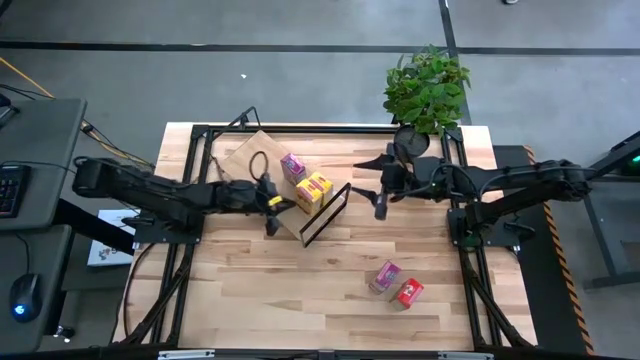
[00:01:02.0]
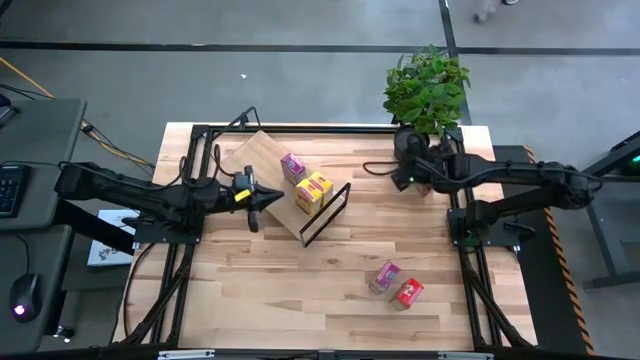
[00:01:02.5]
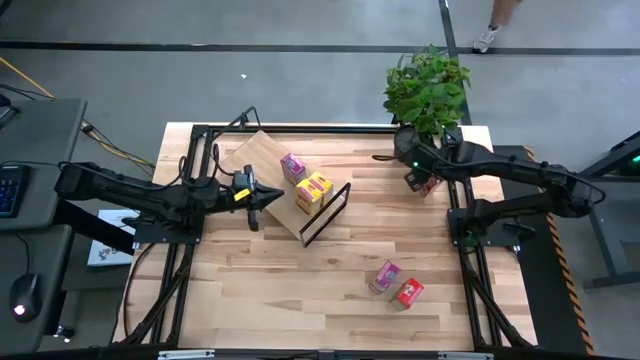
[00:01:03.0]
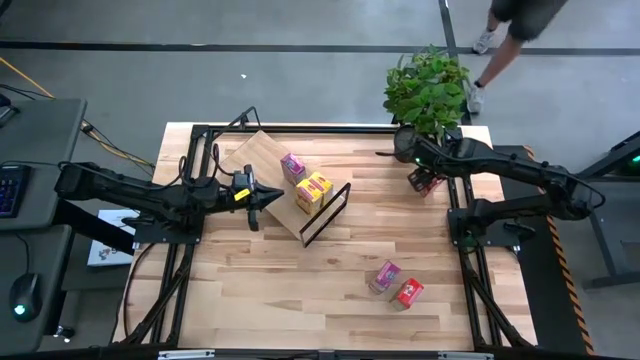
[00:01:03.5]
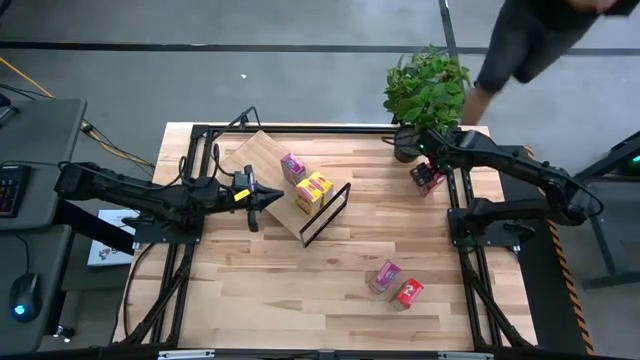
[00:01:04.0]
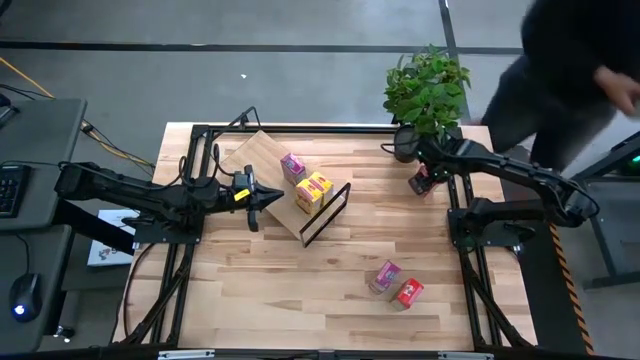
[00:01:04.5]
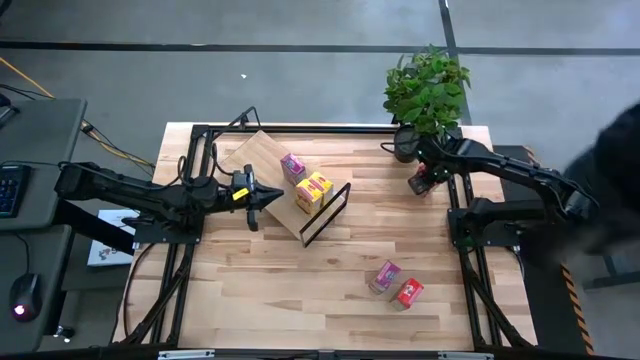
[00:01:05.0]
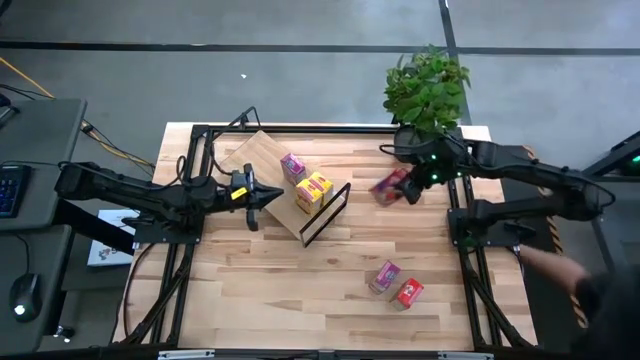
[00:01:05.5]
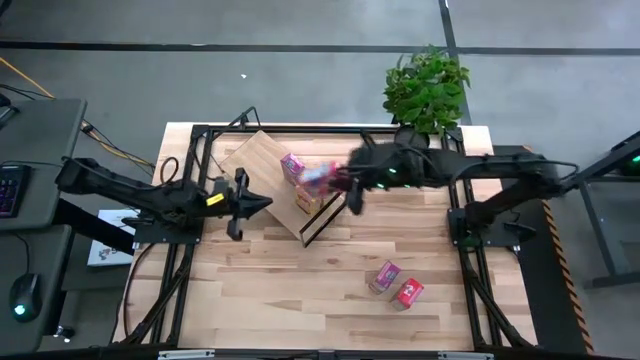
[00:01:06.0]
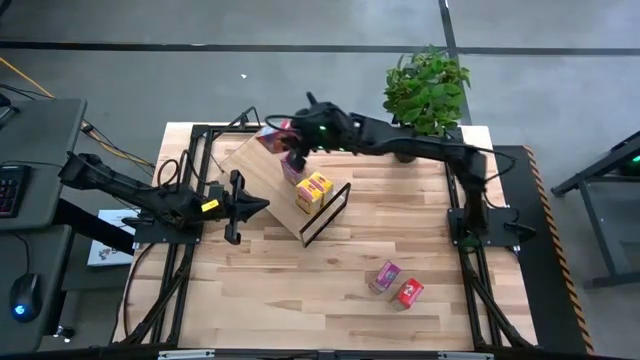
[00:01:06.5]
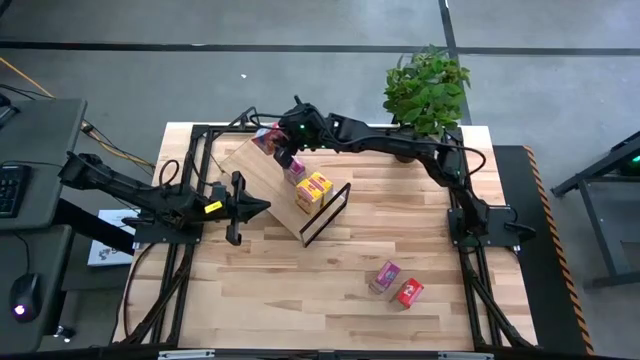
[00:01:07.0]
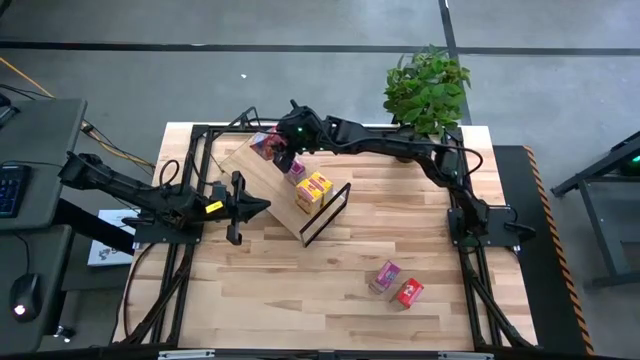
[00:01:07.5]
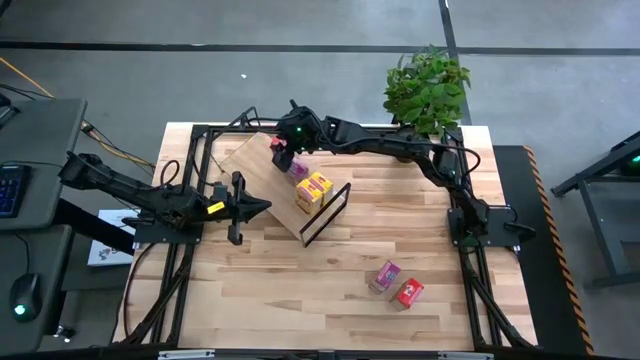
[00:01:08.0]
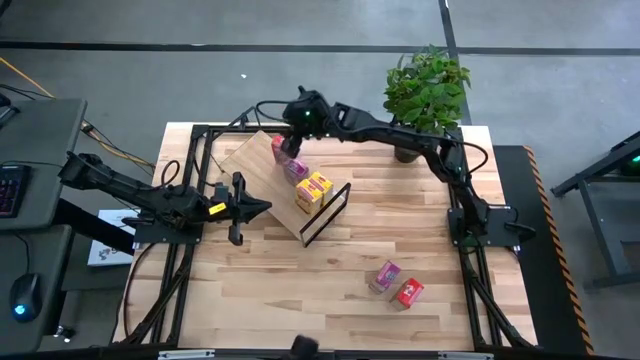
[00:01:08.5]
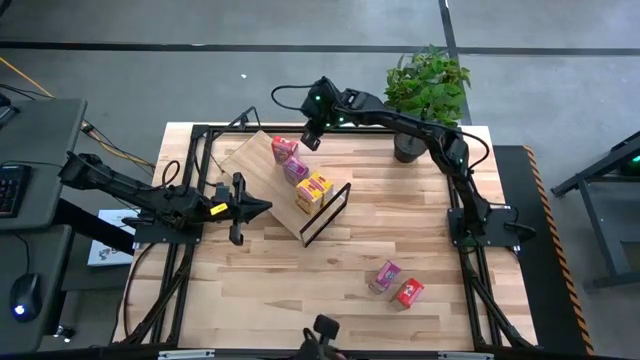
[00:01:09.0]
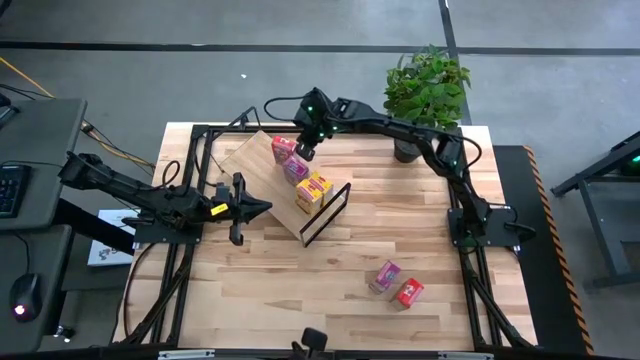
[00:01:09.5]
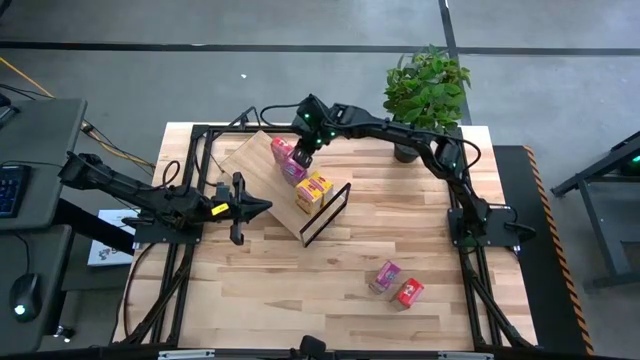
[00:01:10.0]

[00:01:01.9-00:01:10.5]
Task: Stack cereal on shelf
Put the top red cereal box on the shelf

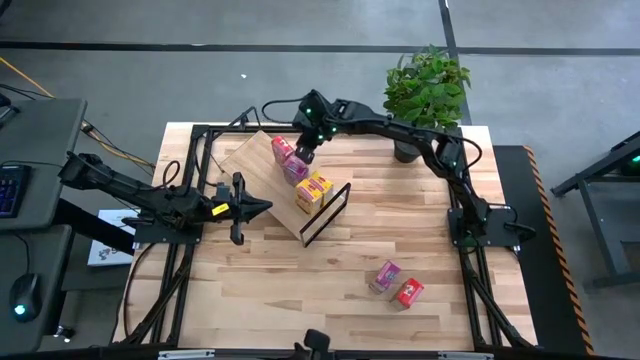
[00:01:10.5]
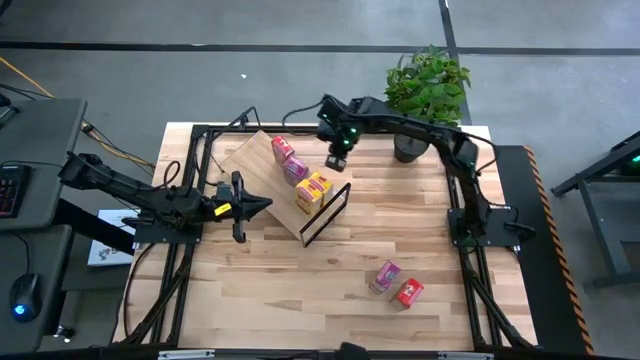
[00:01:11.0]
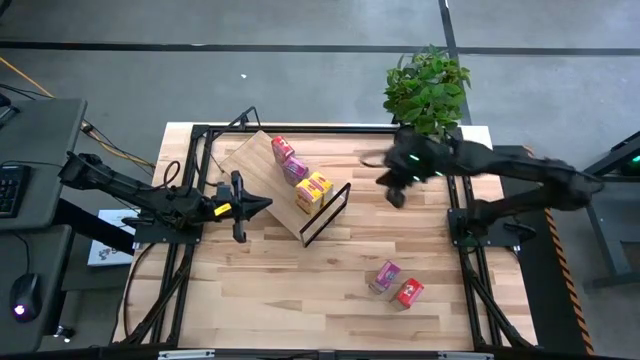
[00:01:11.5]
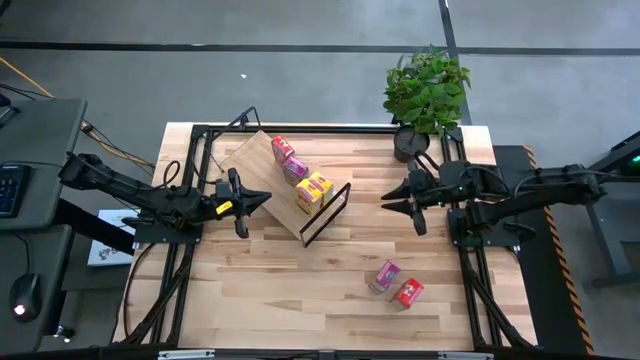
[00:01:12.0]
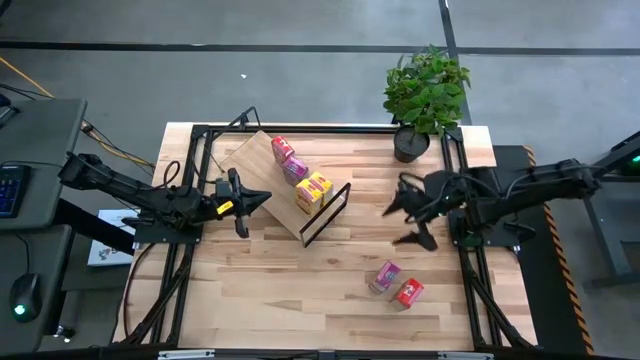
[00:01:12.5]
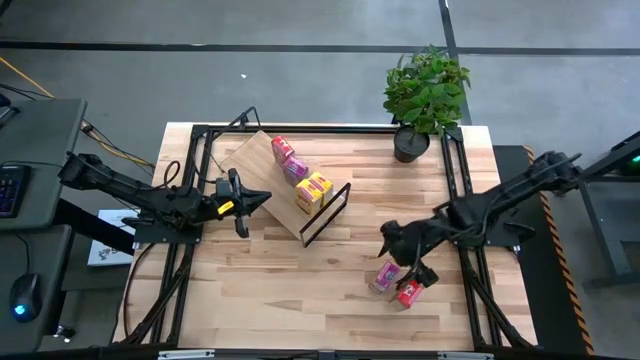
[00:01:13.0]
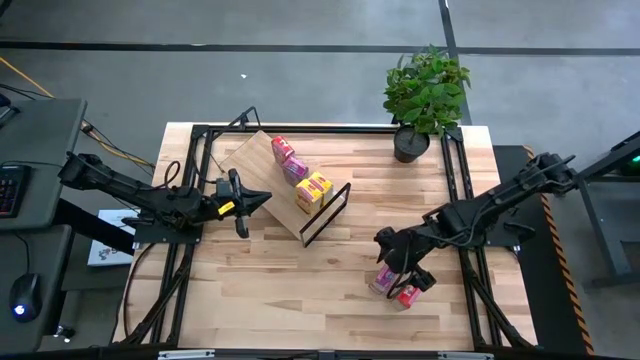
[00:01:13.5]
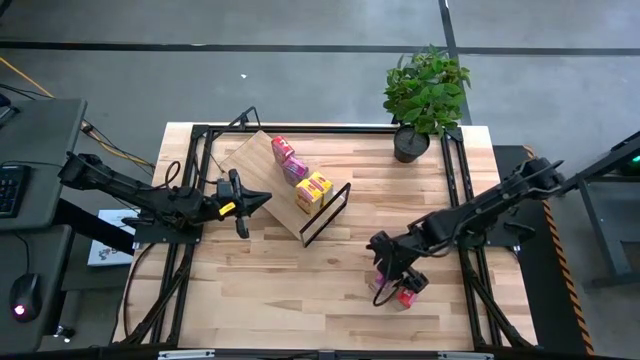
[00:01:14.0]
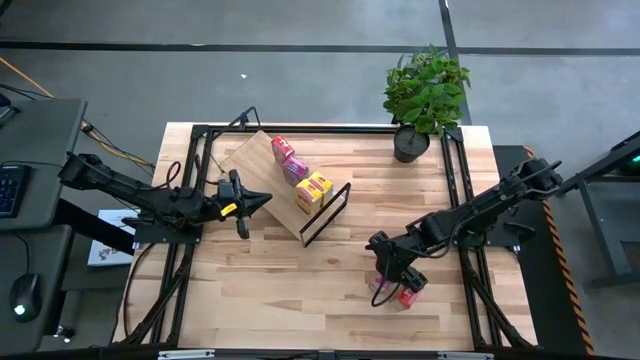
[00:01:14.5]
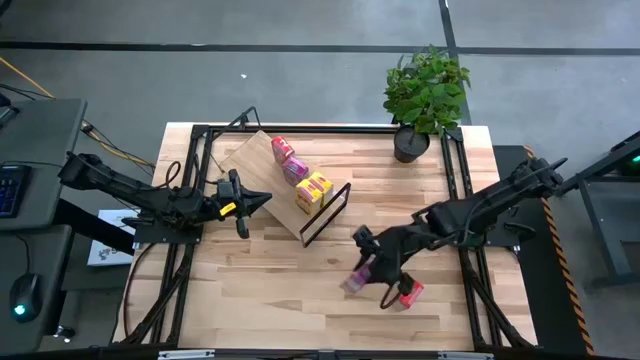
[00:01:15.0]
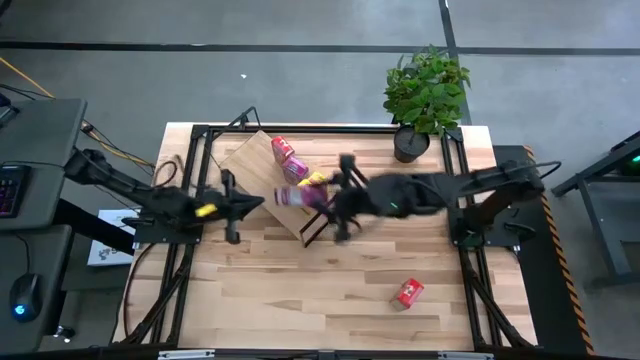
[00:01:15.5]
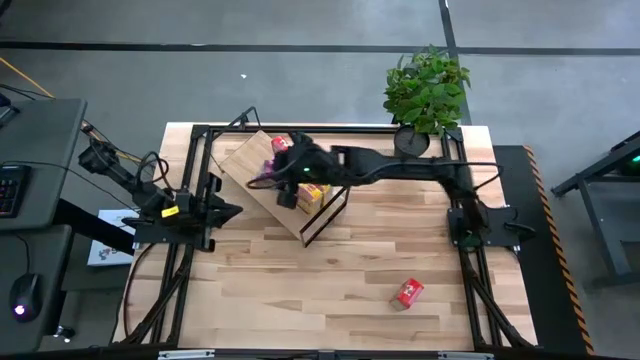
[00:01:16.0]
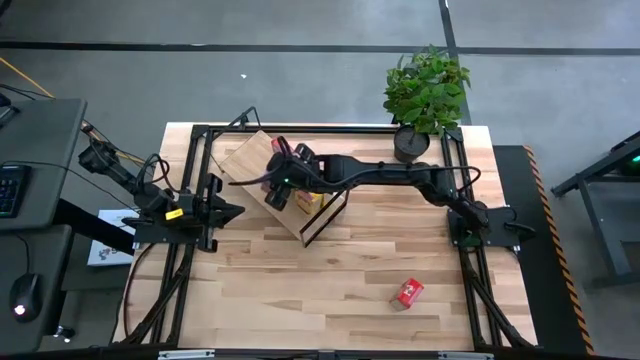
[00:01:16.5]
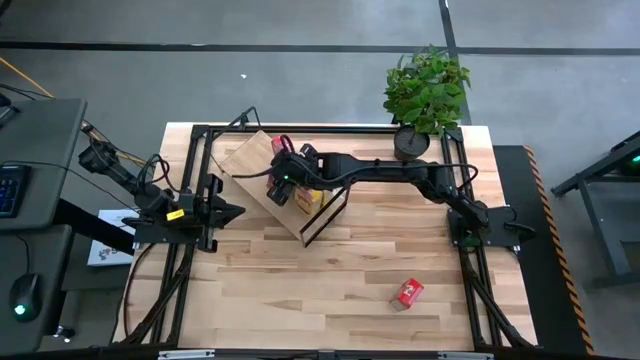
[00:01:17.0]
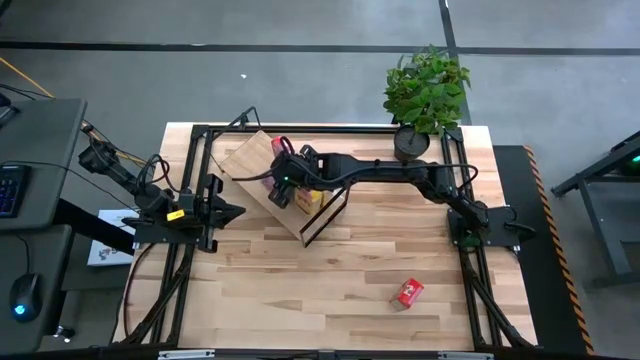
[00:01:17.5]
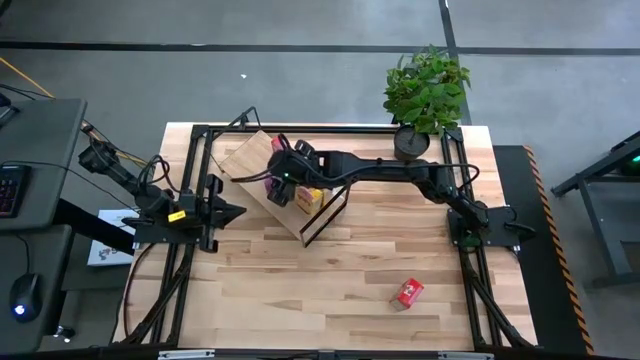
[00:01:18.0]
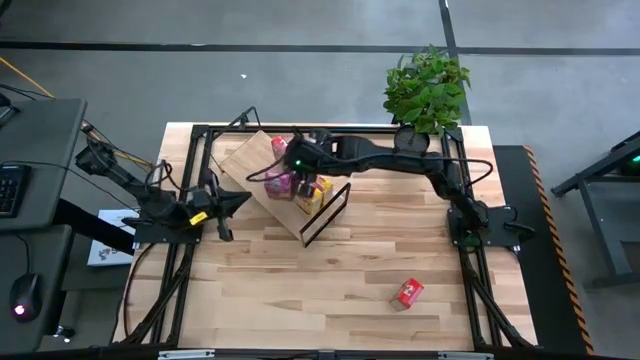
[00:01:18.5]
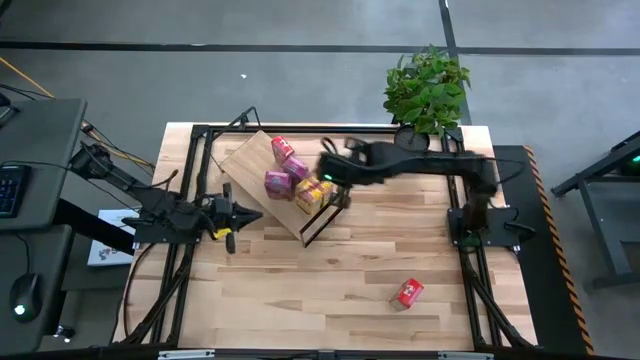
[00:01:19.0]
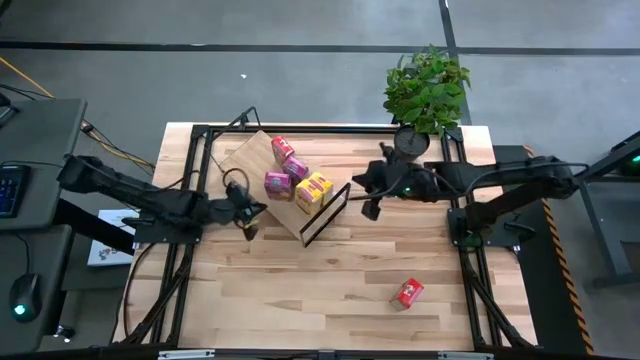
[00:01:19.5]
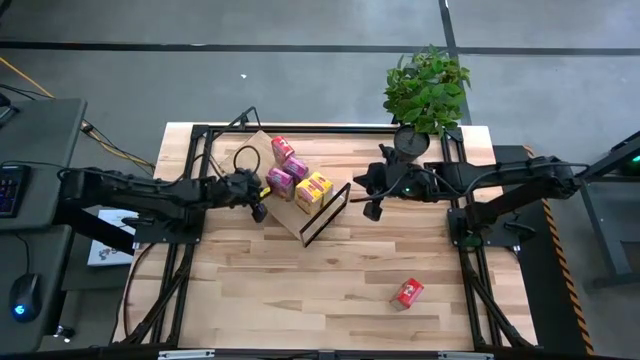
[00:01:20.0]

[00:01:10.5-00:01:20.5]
Put the violet cereal box on the shelf aligned with the other violet cereal box

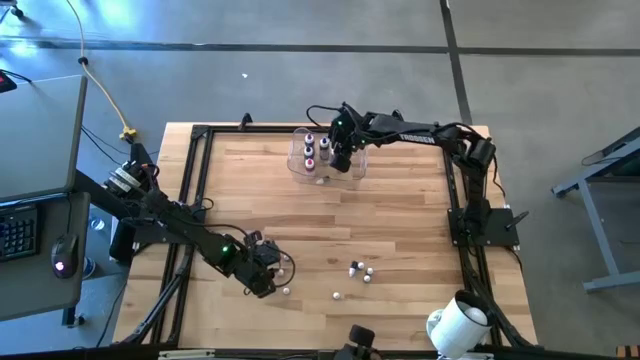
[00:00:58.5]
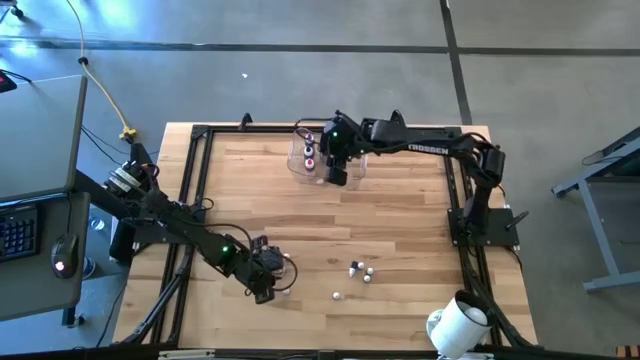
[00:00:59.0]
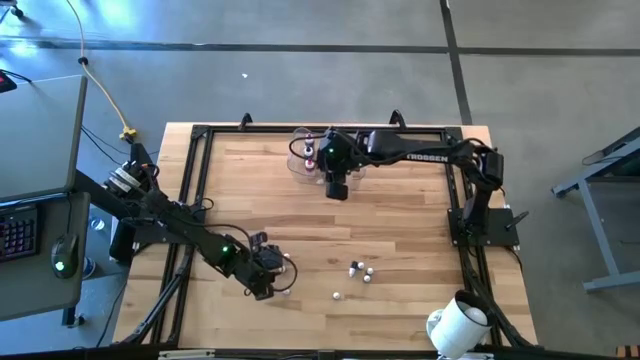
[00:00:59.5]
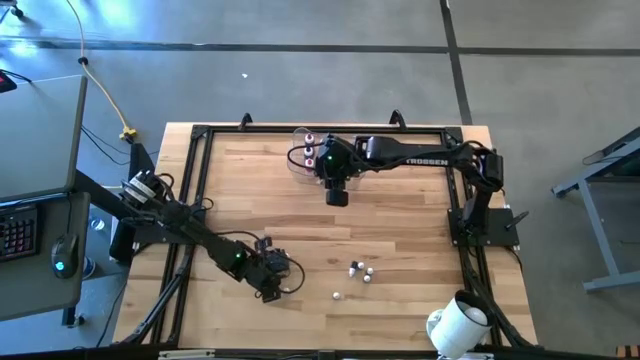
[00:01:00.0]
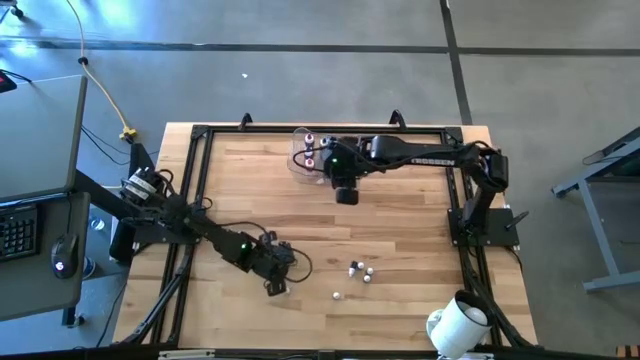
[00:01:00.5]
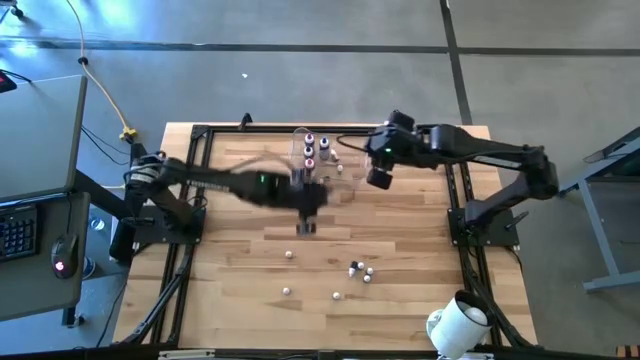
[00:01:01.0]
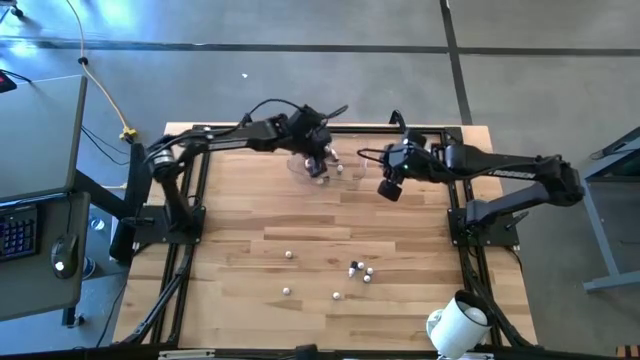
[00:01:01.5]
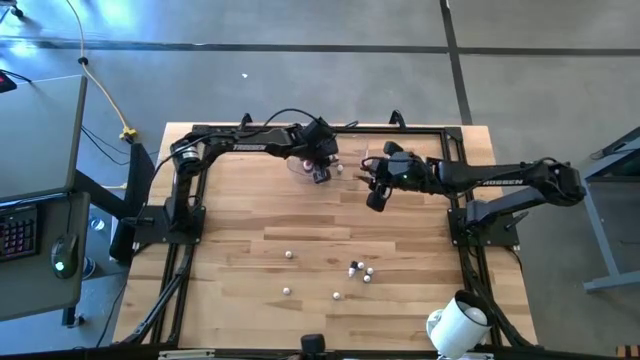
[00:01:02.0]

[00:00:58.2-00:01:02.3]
Task: Pick & Place food coloring
Put the red food coloring into the transparent bin
